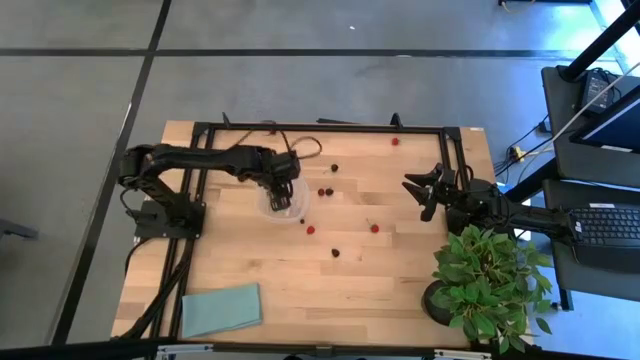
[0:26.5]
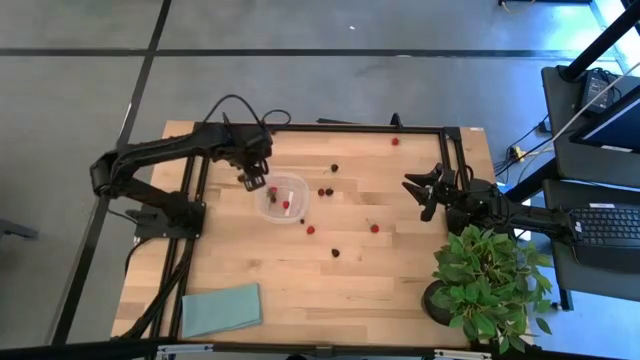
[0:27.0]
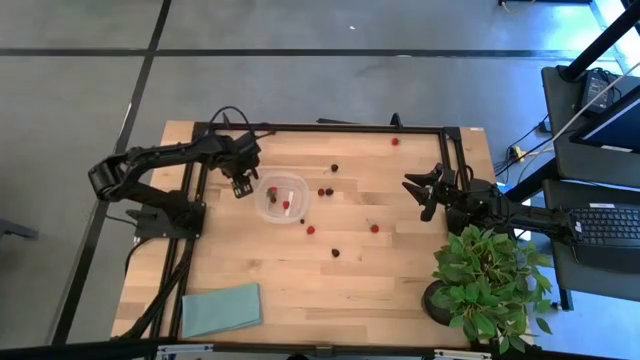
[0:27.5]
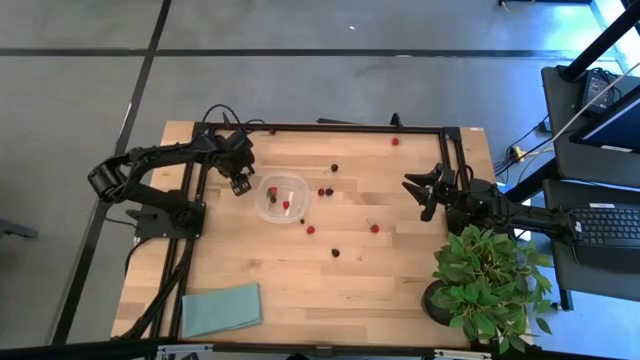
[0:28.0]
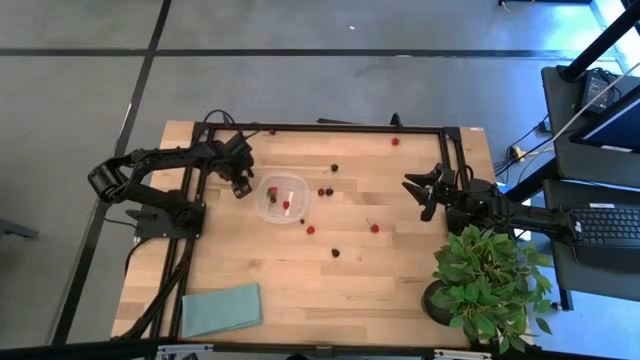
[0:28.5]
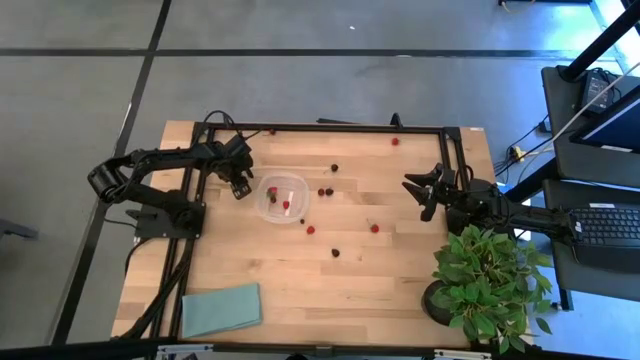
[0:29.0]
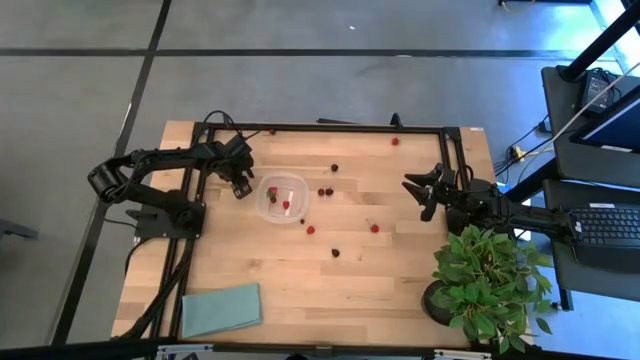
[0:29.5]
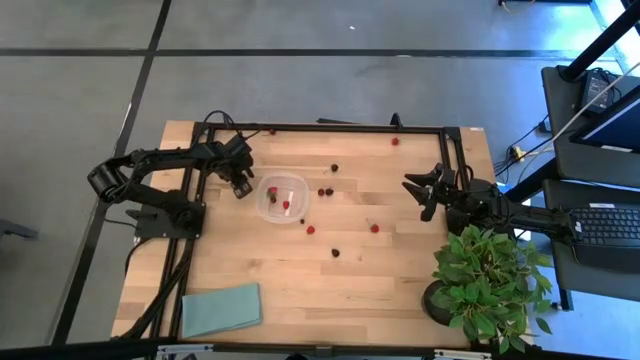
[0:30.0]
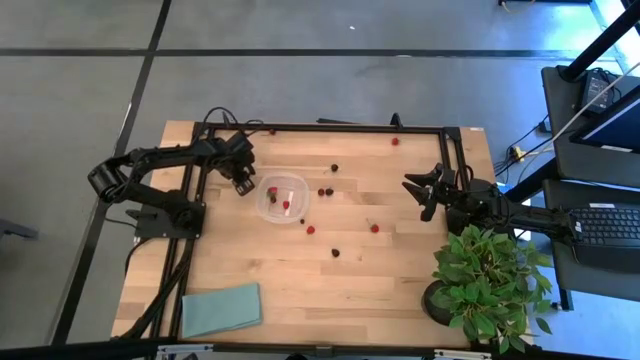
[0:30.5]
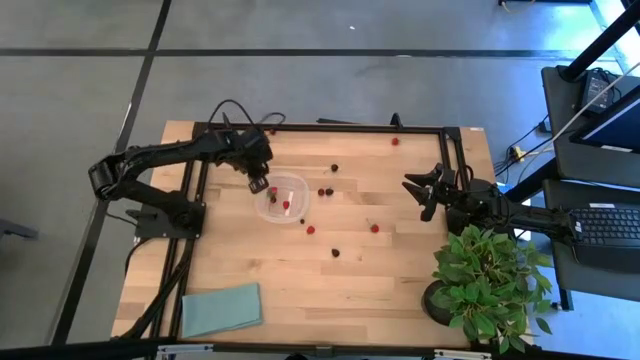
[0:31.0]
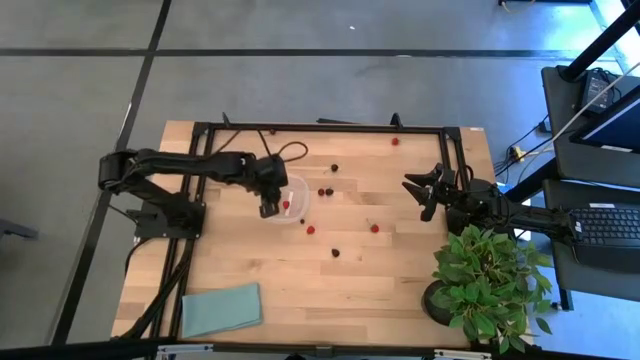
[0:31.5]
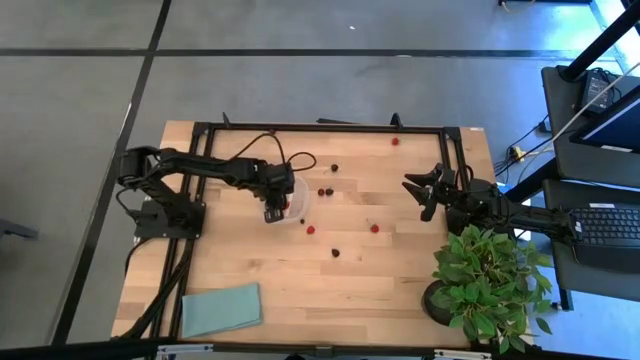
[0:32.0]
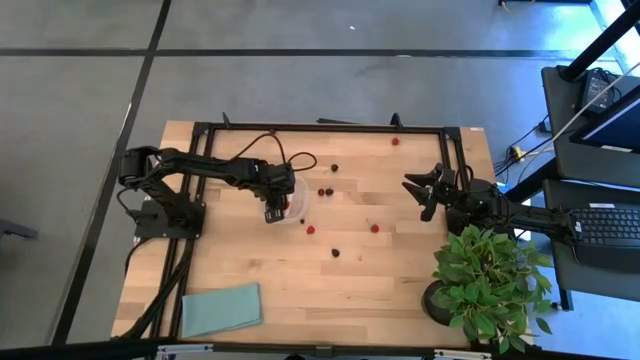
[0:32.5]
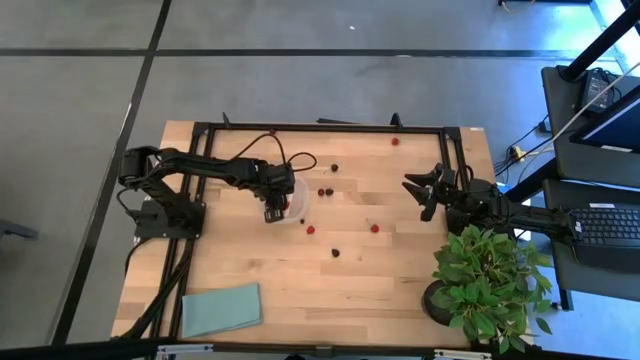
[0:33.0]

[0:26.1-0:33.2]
Task: Pick and placing Produce into tupperware
Put the left black cherry into the transparent container

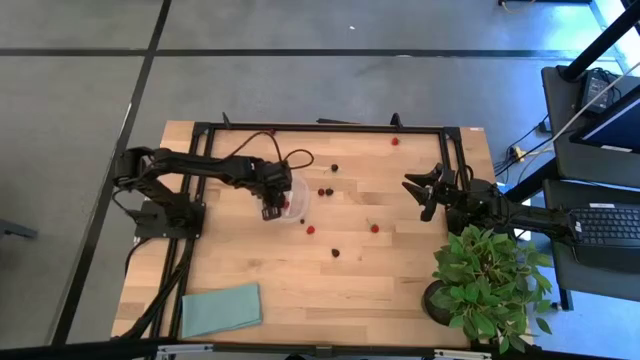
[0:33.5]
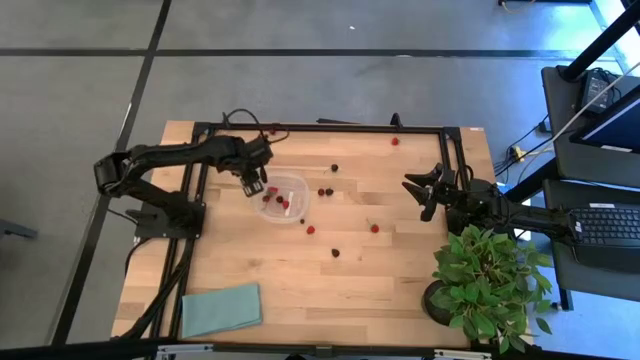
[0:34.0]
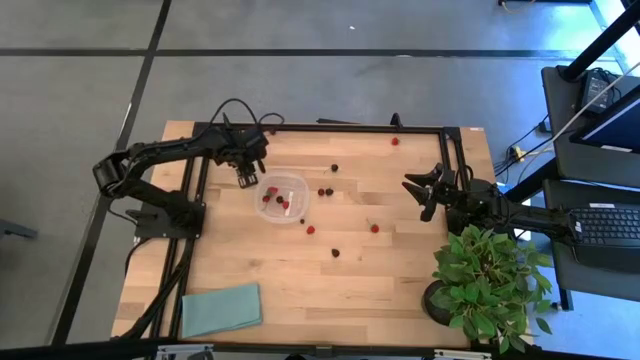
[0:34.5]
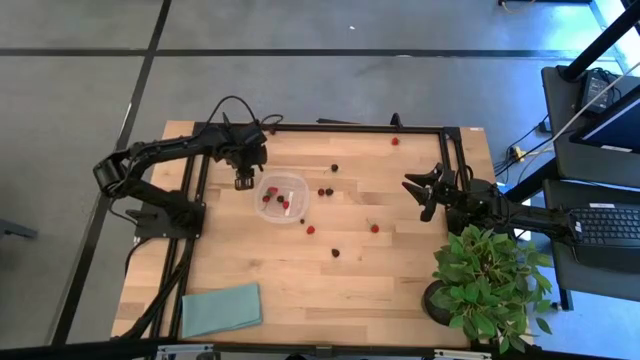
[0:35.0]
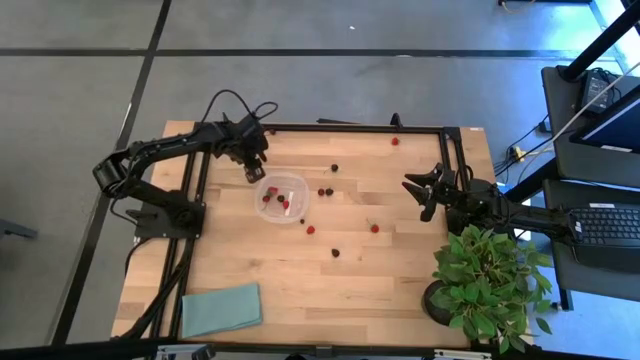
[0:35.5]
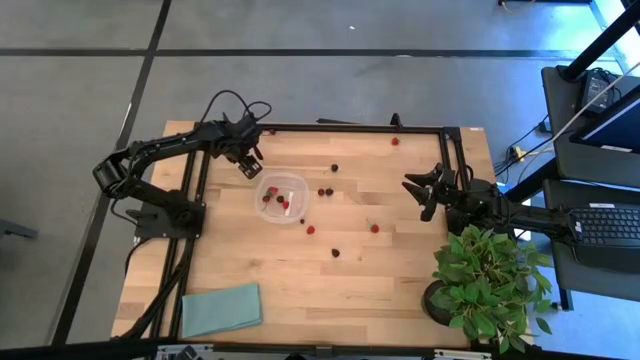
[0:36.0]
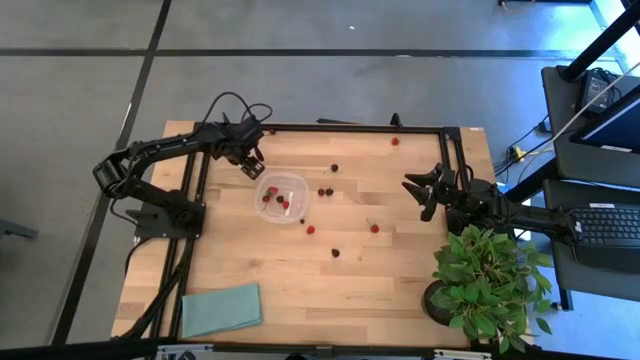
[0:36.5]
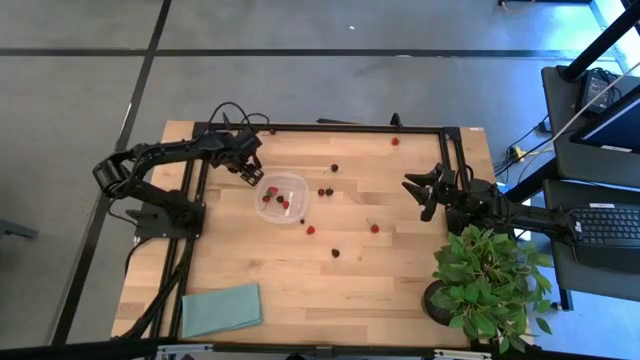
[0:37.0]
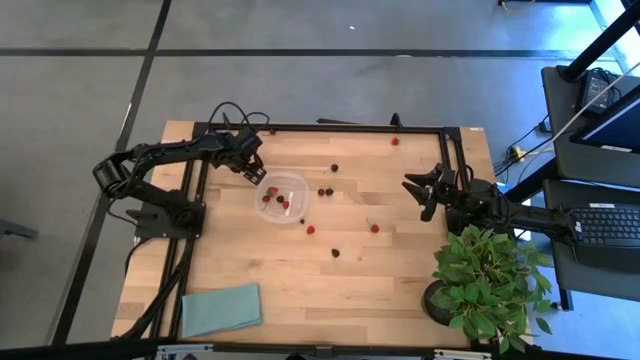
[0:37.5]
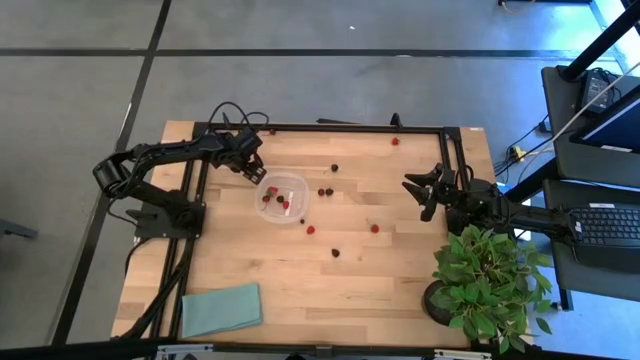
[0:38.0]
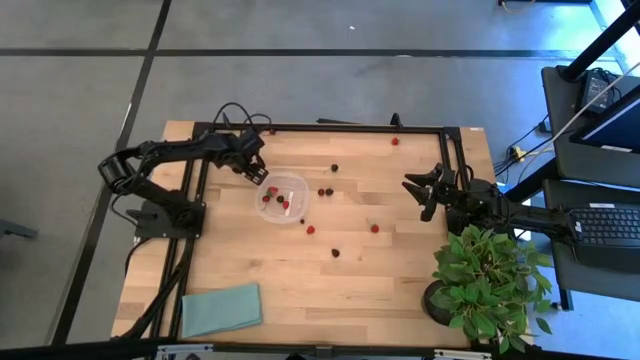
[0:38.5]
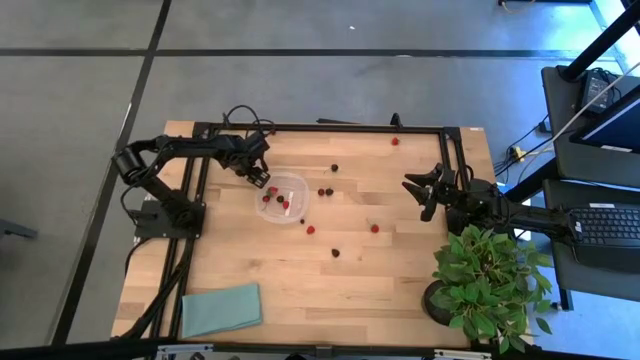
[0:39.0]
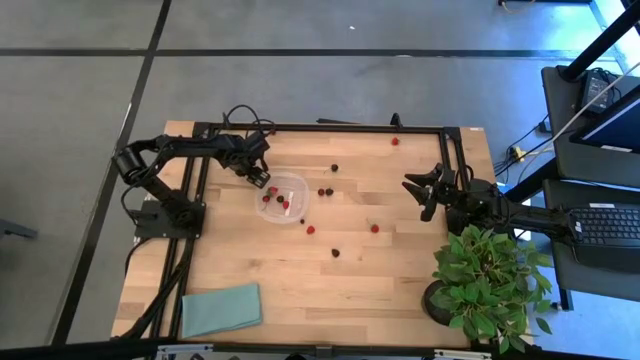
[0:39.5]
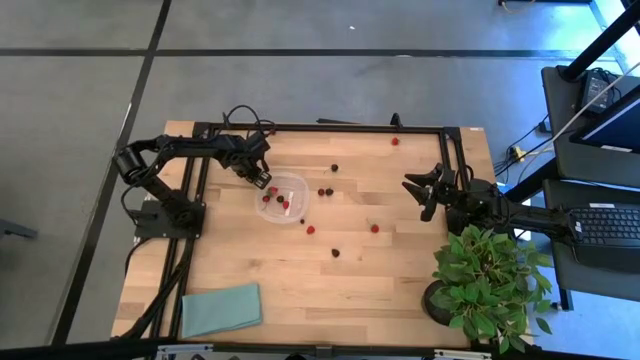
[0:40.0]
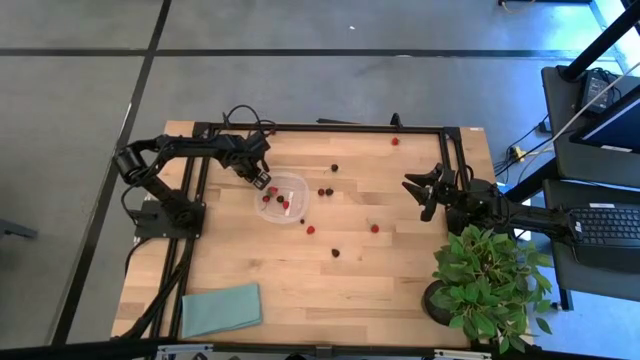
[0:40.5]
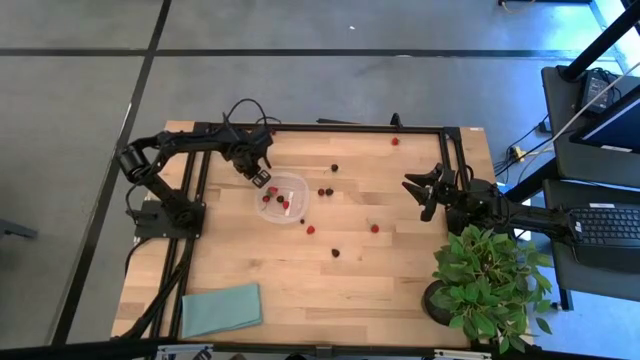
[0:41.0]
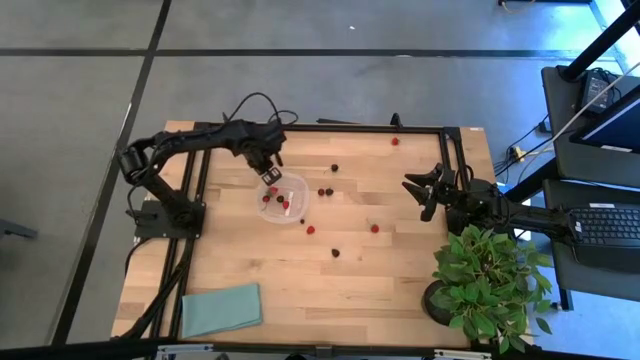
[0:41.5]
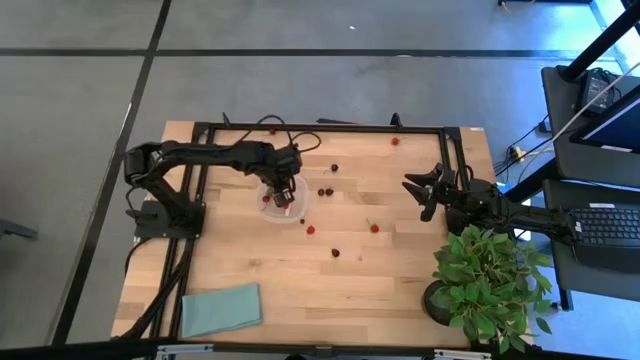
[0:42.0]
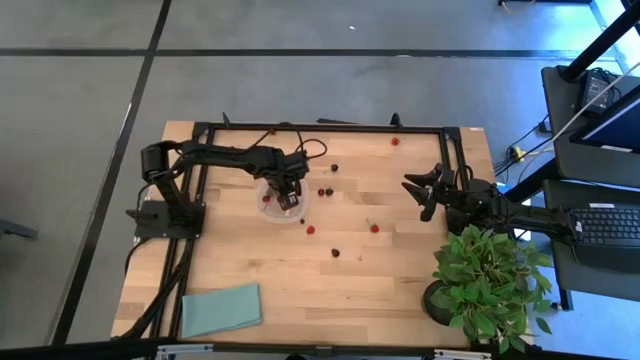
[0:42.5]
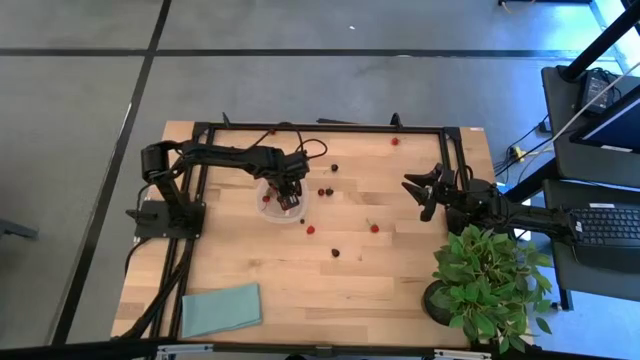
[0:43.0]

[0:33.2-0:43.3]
Put the top blueberry into the transparent container

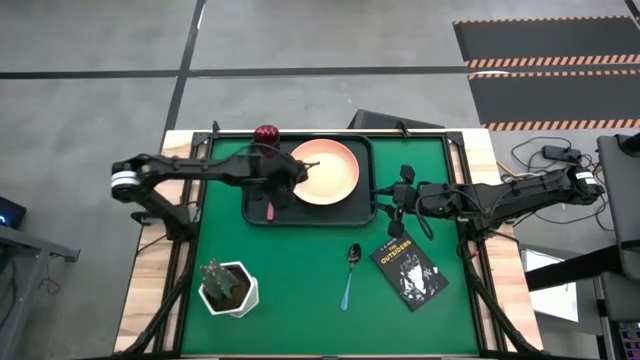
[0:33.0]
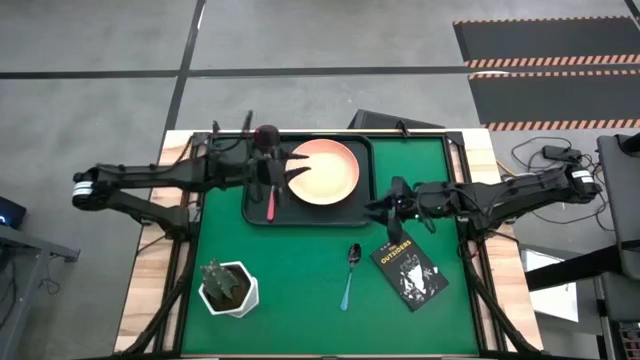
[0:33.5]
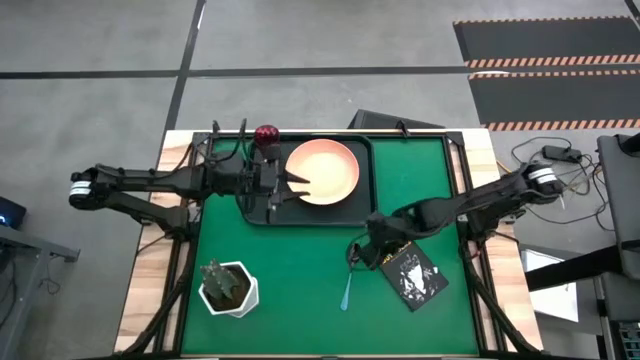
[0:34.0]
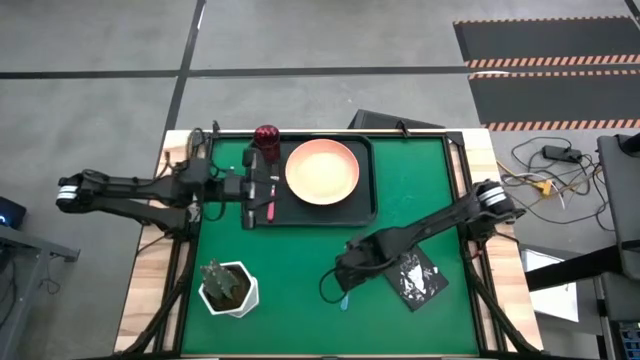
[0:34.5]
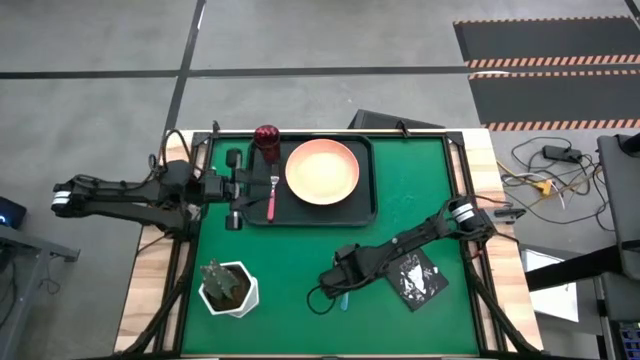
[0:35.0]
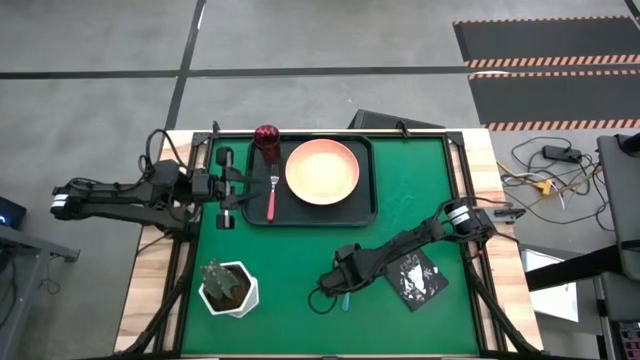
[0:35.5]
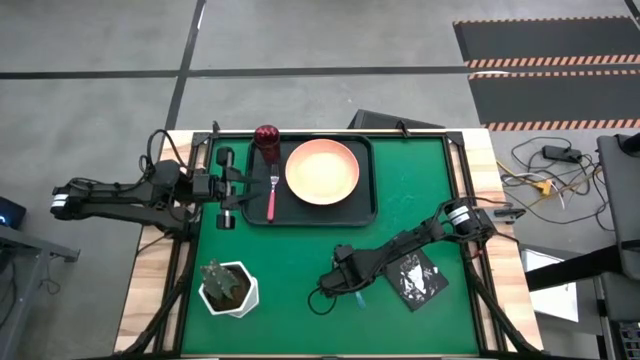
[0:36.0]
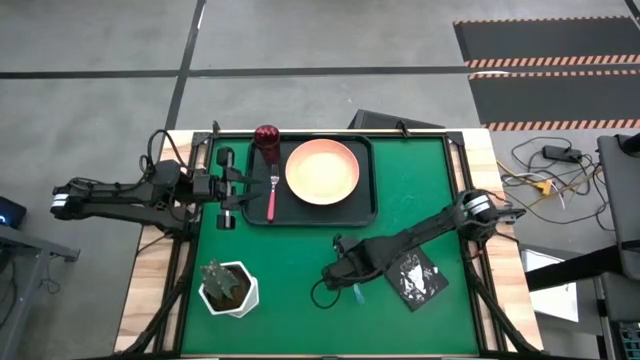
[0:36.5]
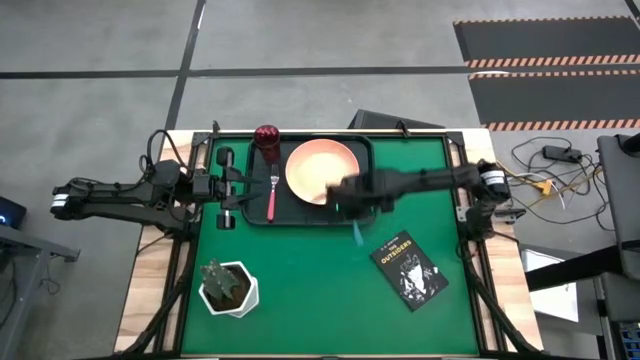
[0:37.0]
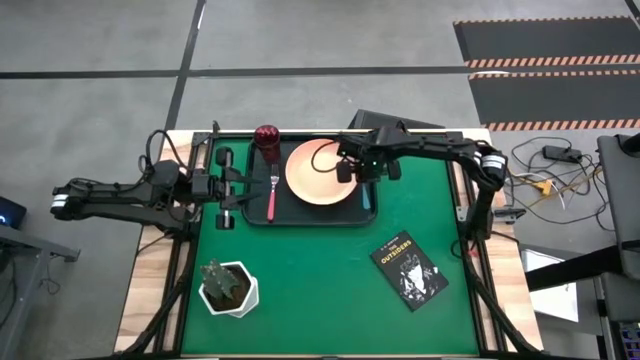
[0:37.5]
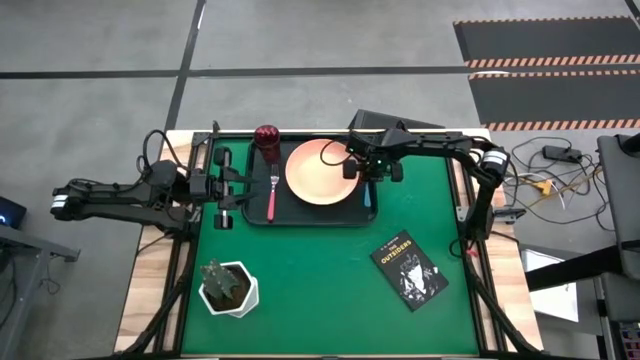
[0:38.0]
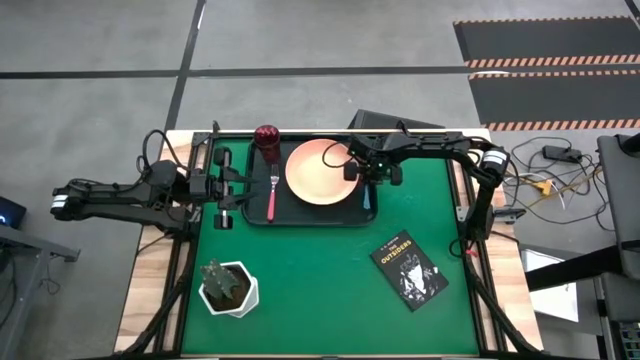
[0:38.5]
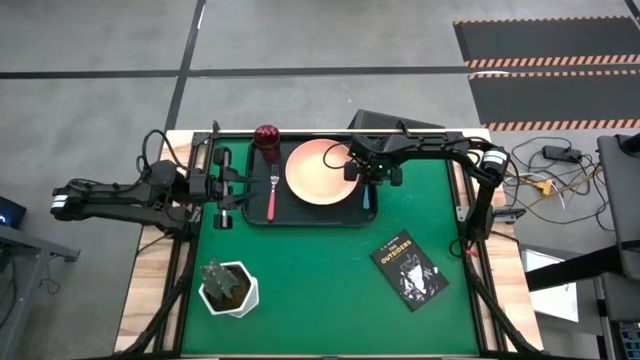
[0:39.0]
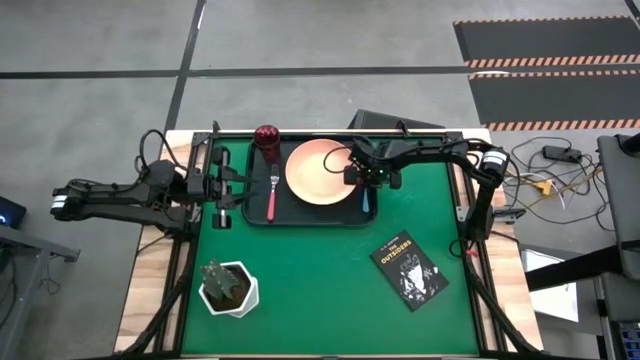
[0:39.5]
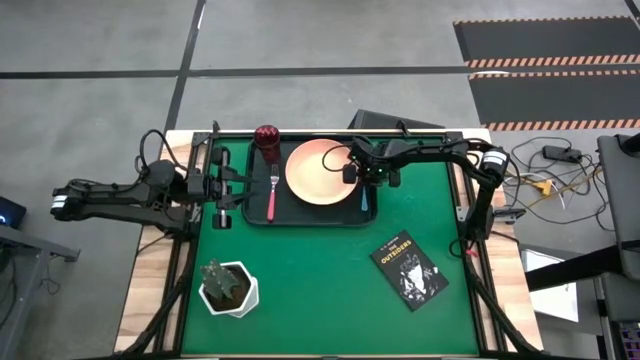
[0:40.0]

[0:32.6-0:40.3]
Task: Pick and place plate/cup/fork/spoon on tray
Put the blue spoon on the black tray on the right side of the light pink plate
